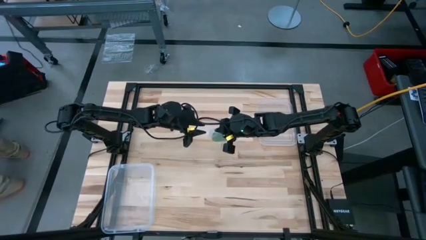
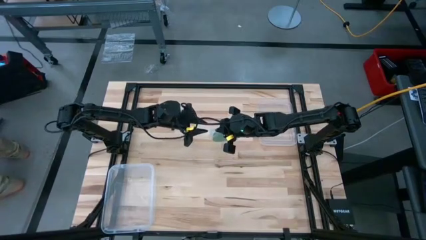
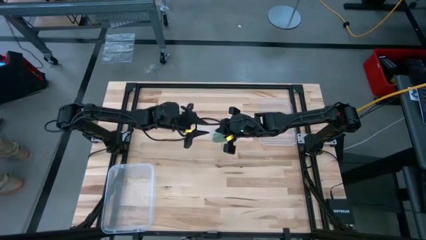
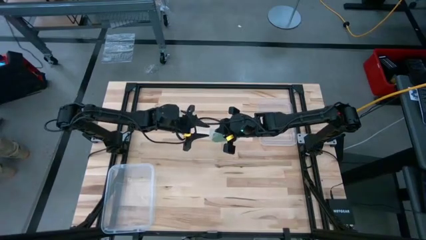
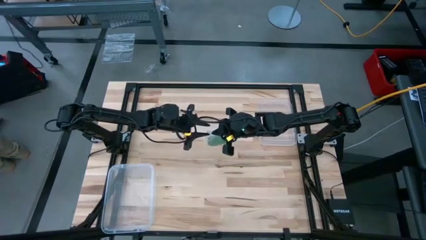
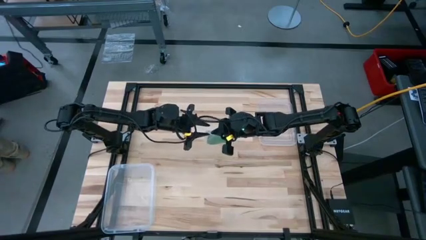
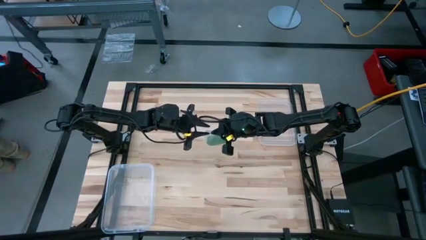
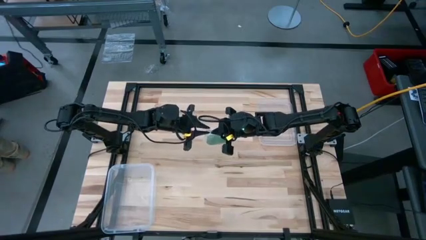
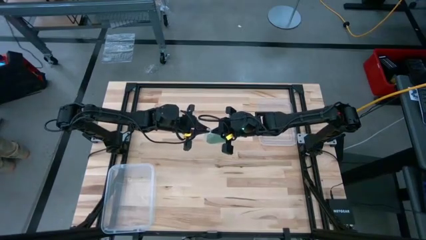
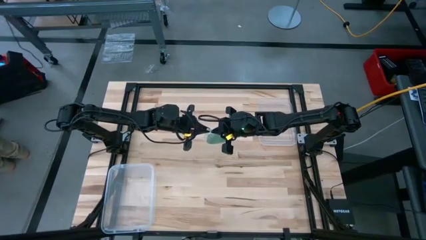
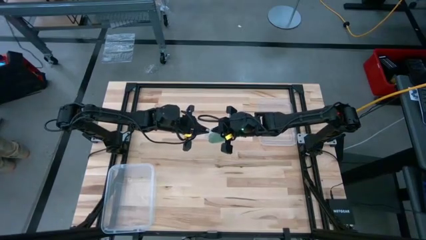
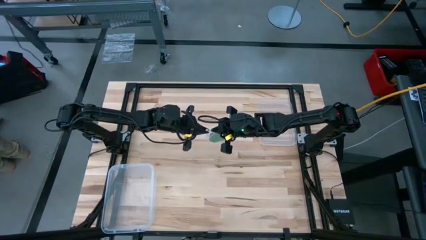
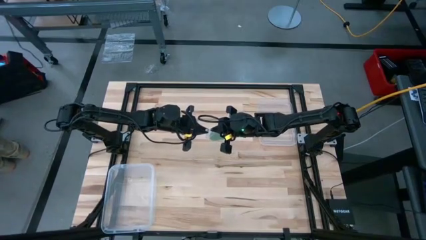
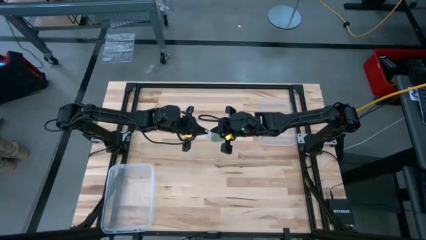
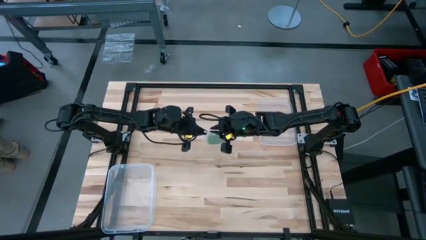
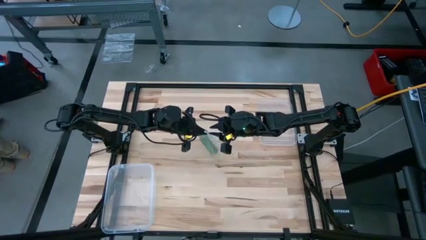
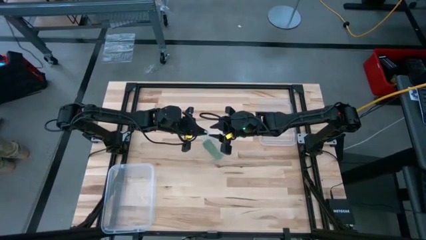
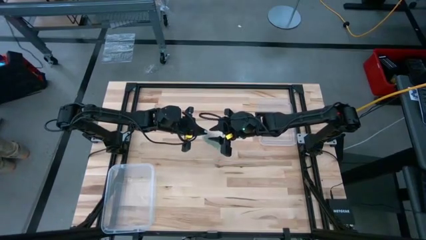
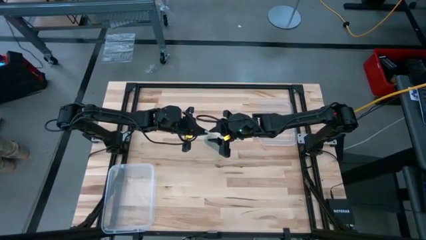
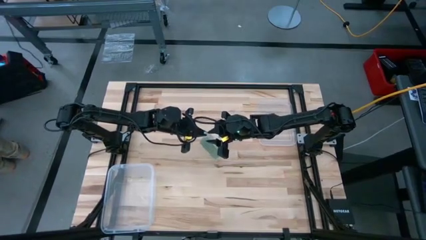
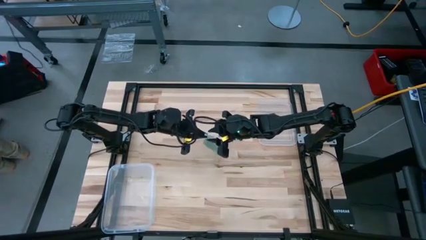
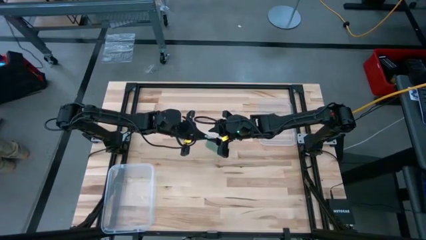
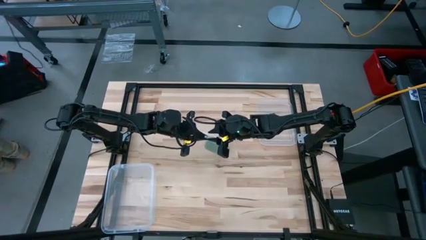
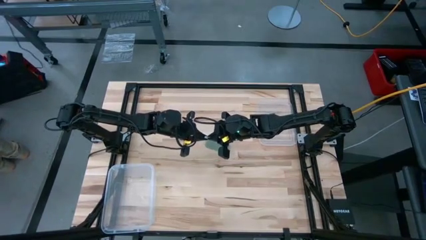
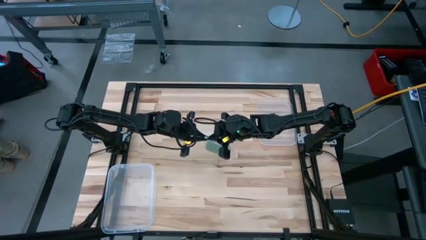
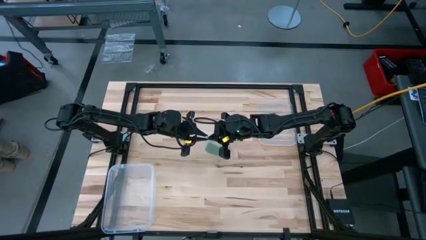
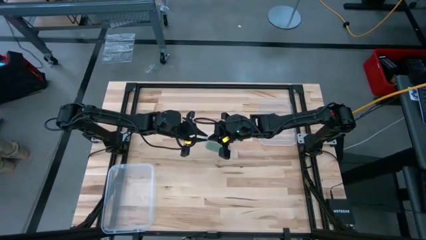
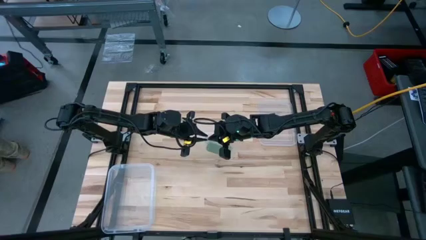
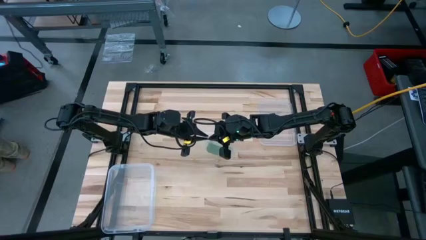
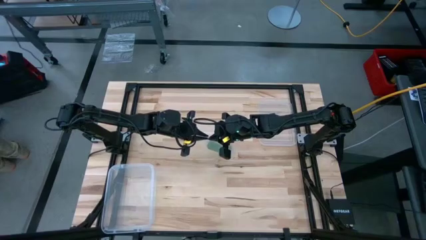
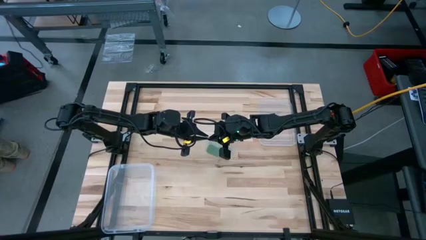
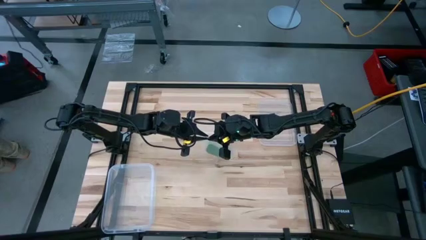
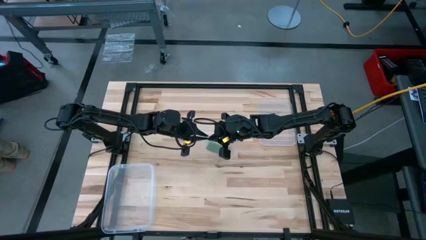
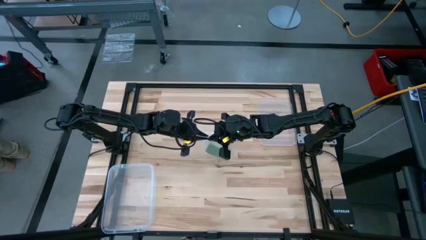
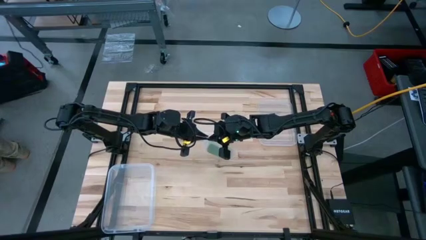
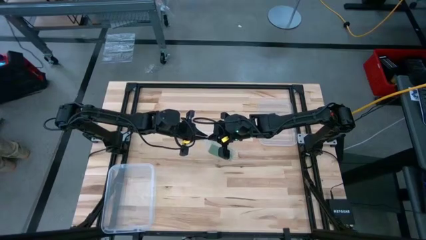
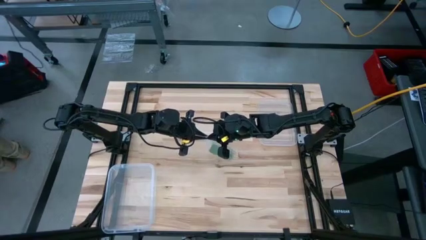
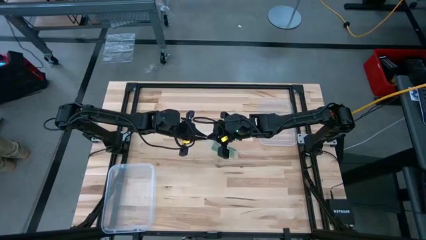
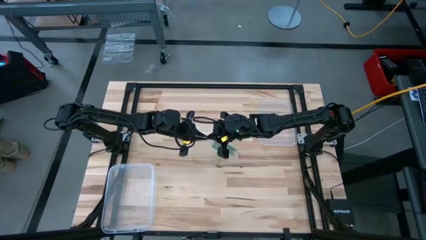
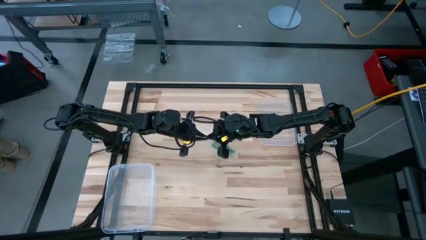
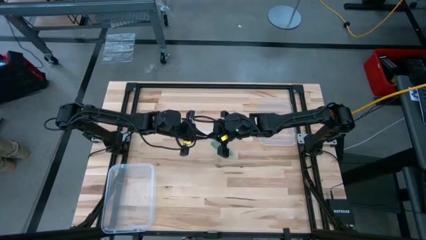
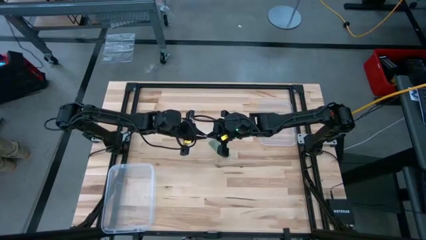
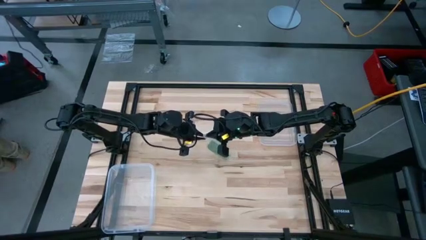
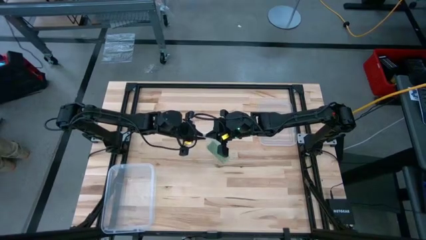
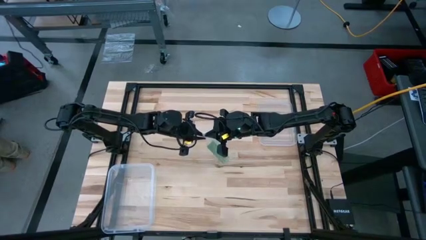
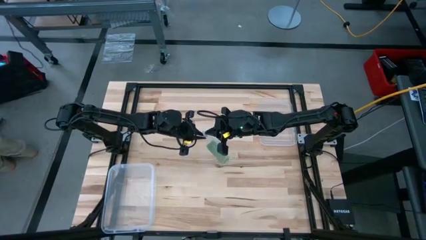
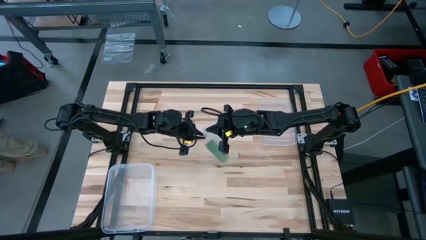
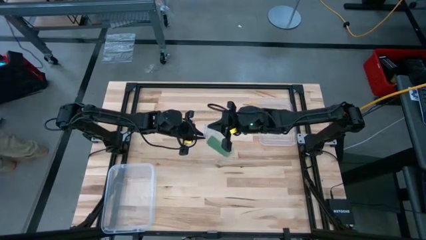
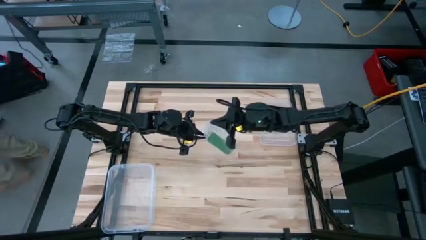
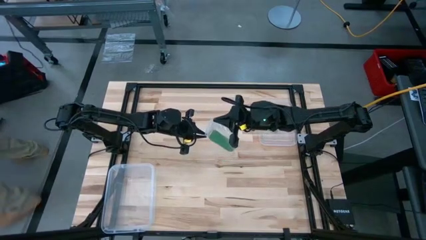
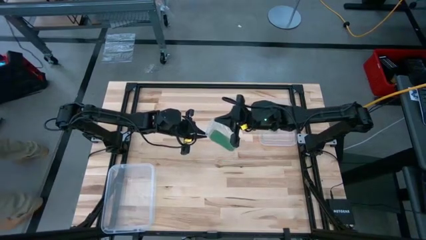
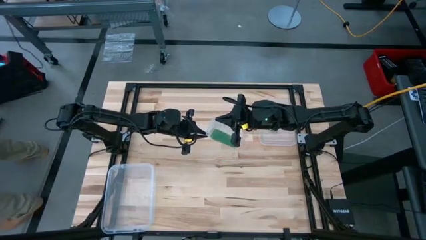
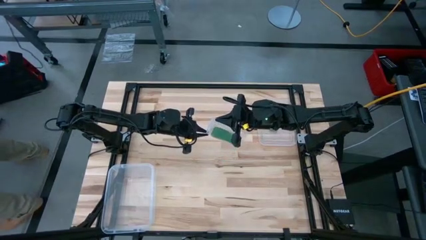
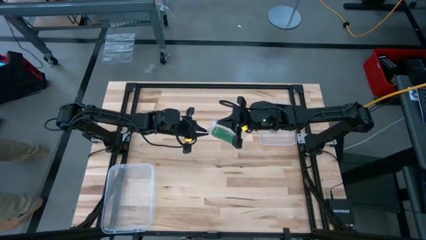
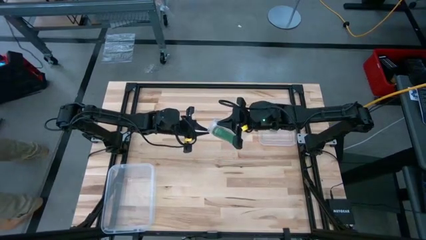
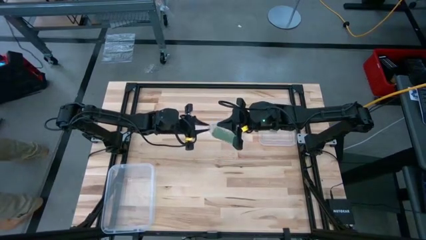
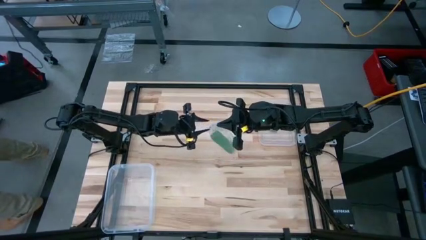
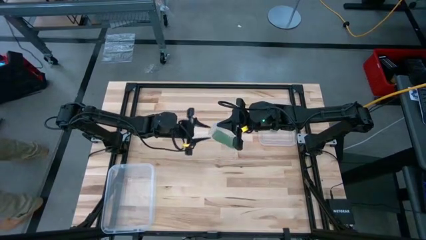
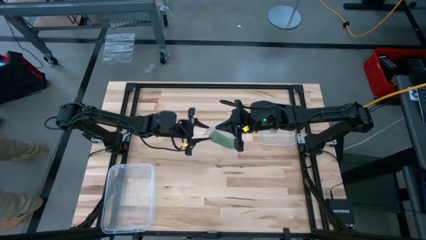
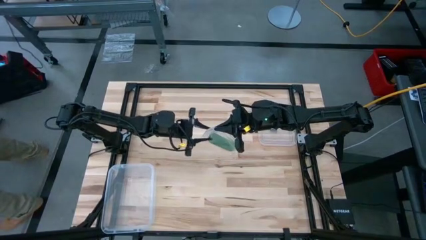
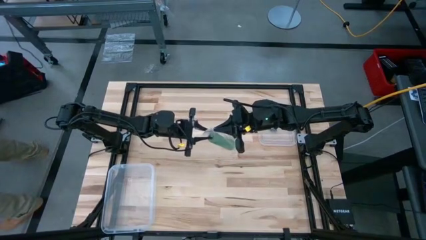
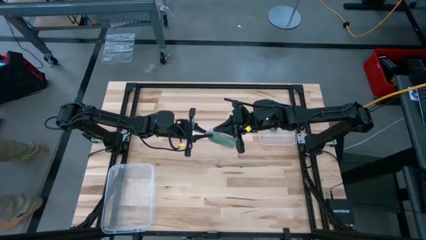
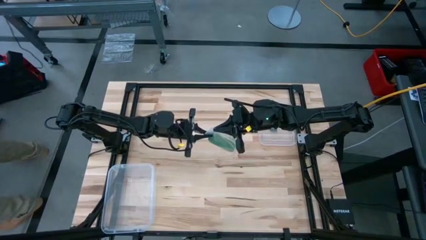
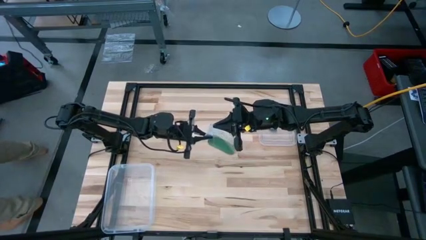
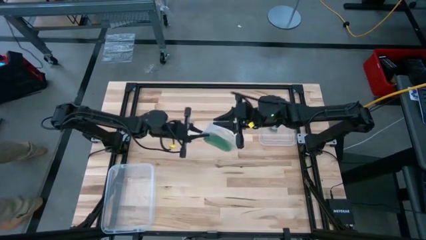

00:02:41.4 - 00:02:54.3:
Task: Roll bandage
Close the zip bag

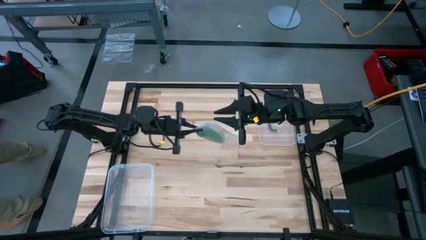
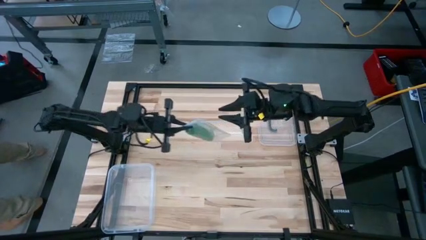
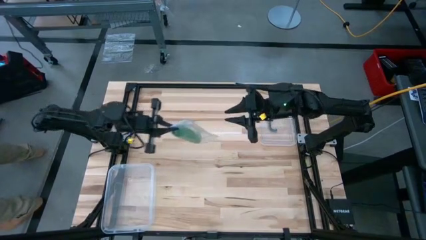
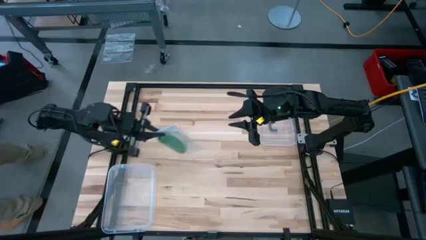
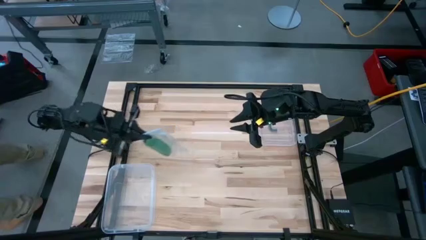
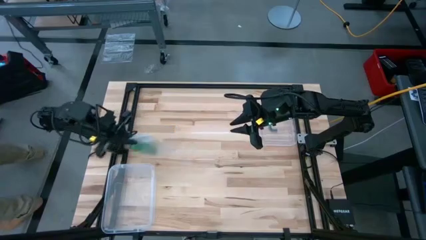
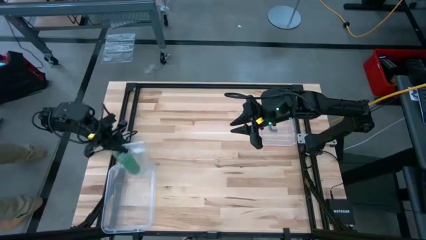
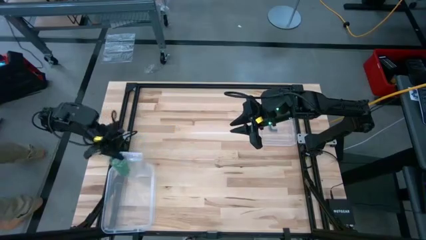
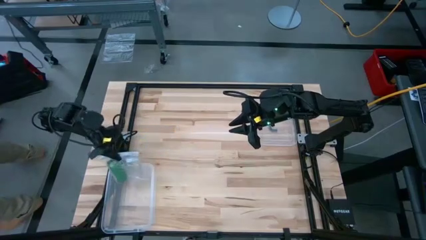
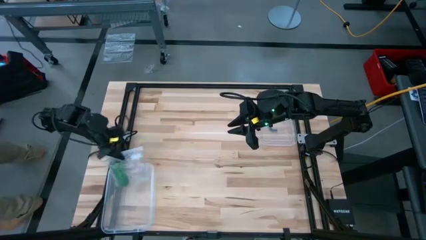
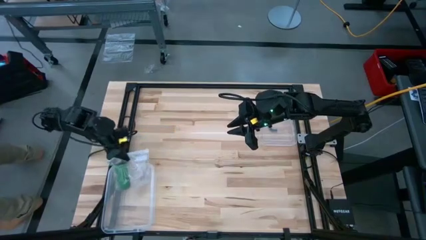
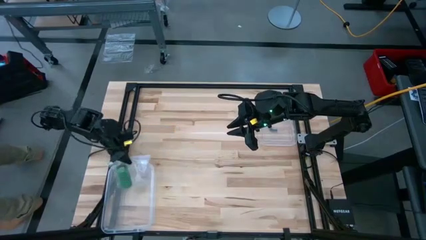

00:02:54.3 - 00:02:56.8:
Put the zip bag into the transparent bin

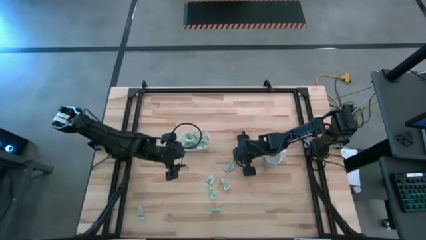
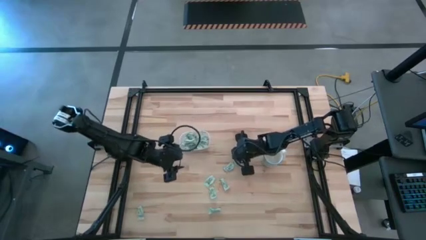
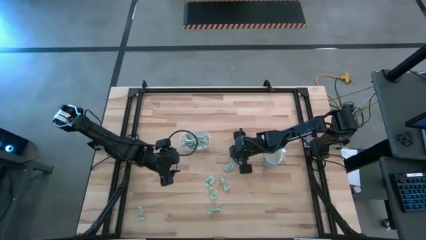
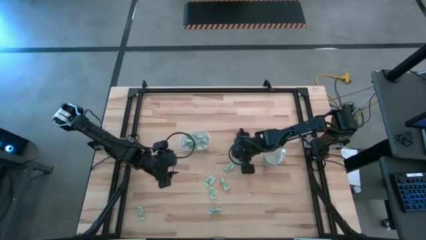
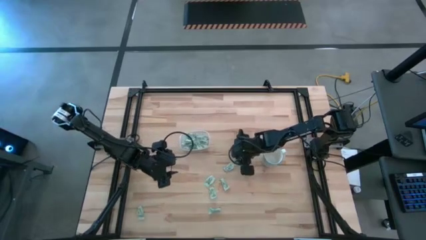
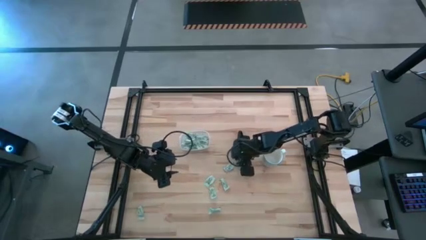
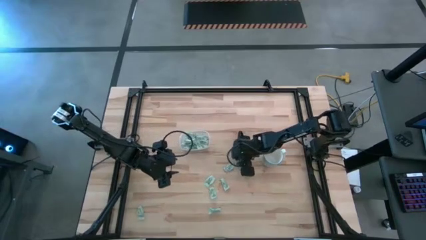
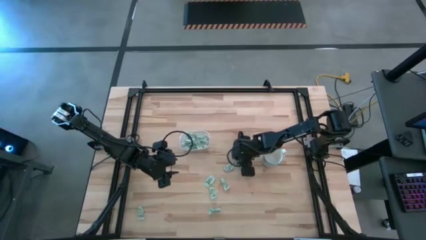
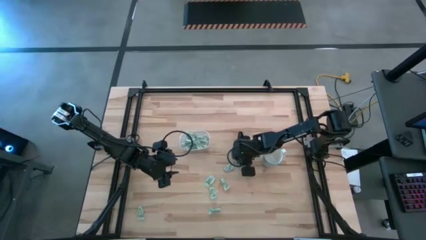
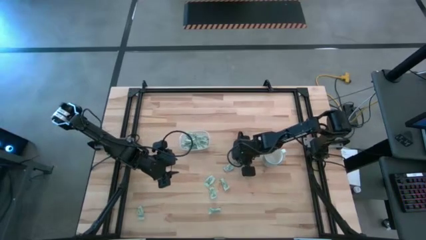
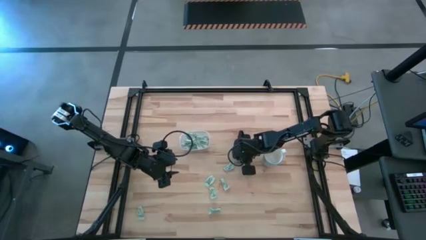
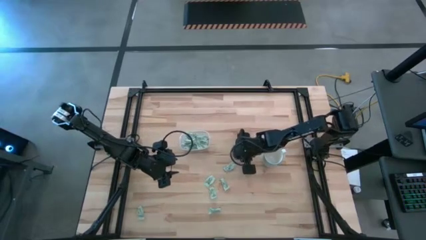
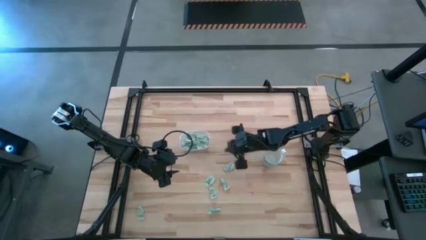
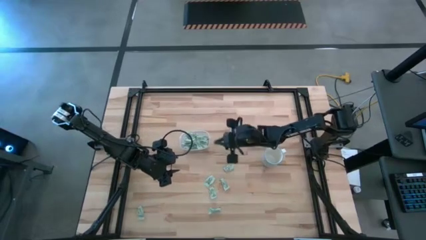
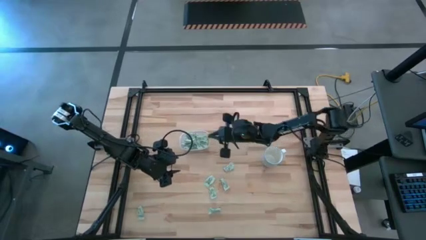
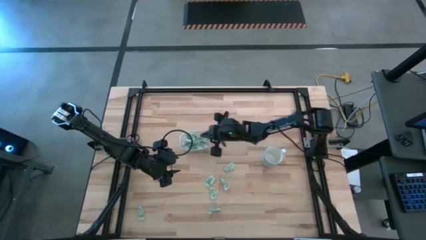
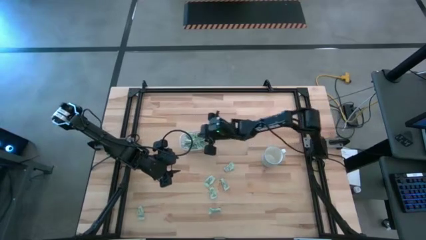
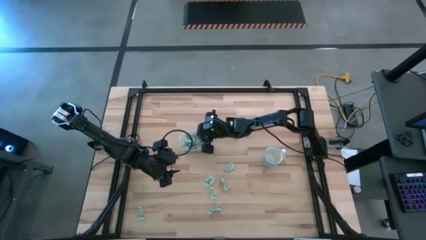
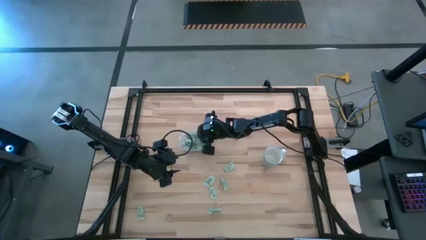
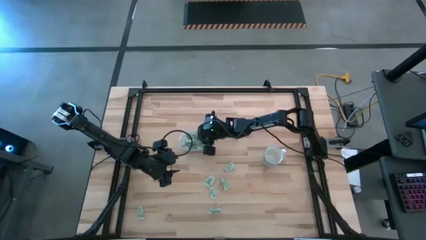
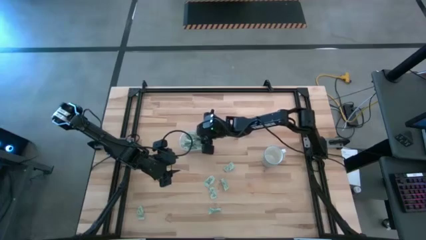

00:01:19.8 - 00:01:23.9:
Task: Pick and place Stevia / Truvia into bins
Put the stevia packet into the transparent bin
